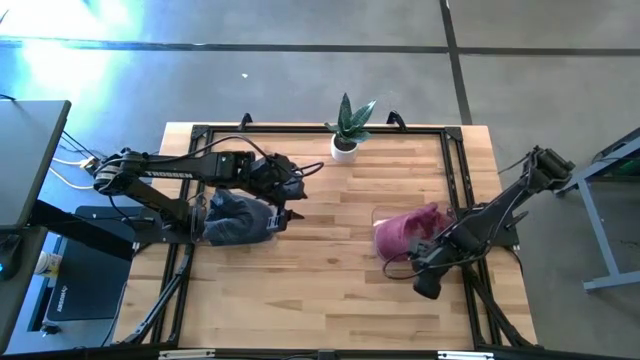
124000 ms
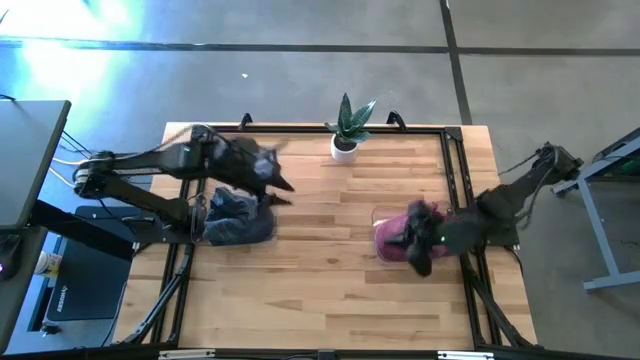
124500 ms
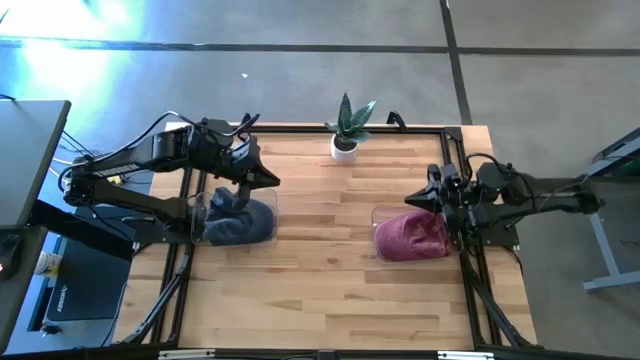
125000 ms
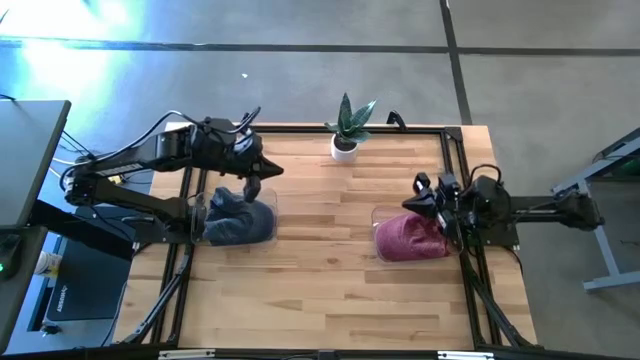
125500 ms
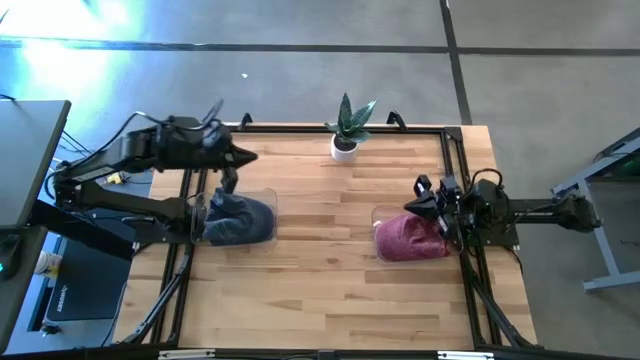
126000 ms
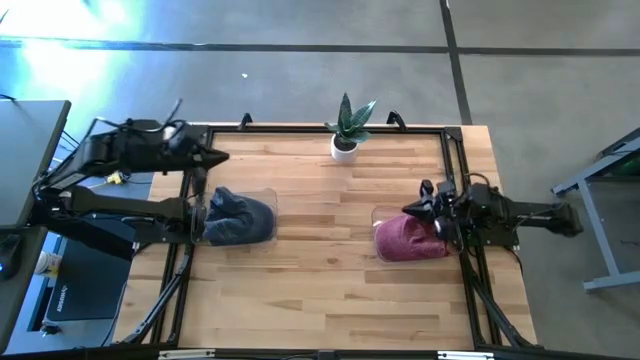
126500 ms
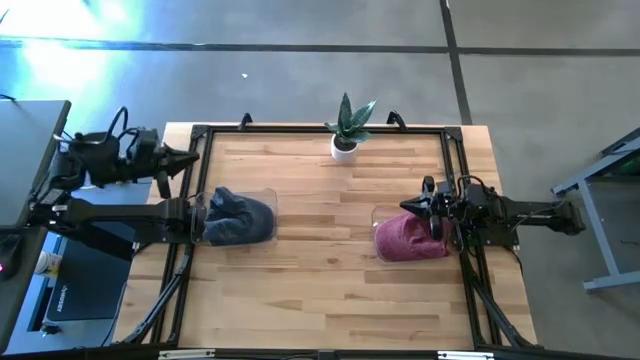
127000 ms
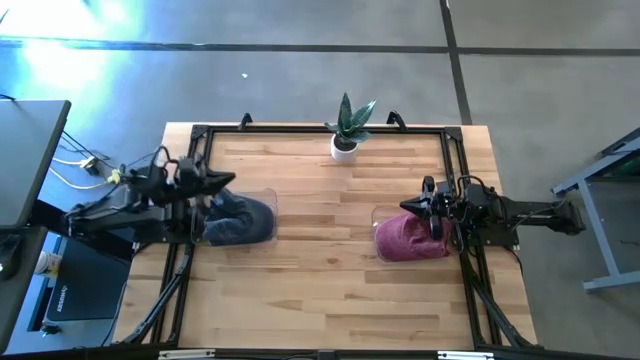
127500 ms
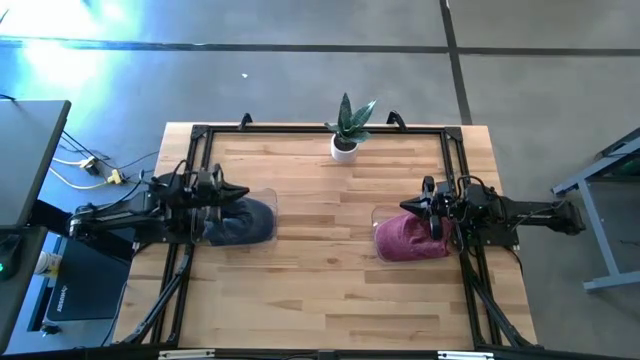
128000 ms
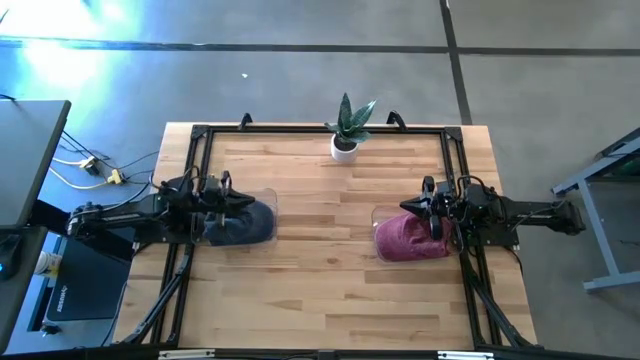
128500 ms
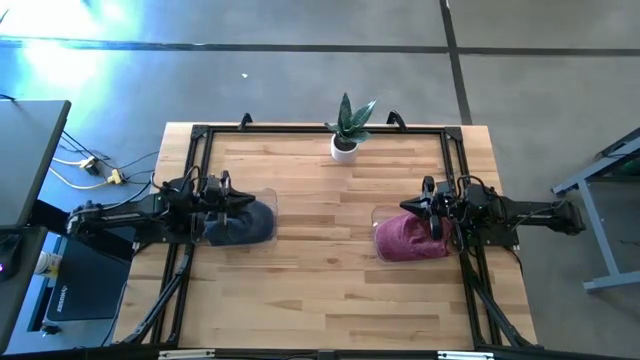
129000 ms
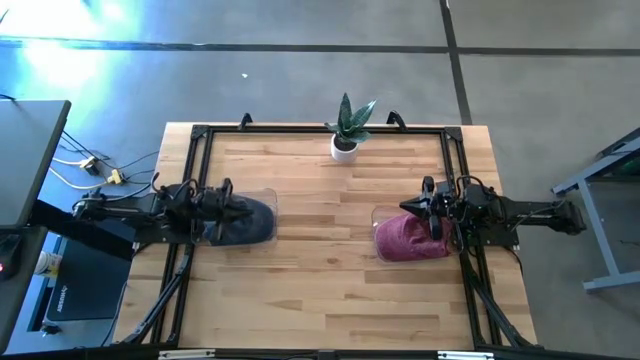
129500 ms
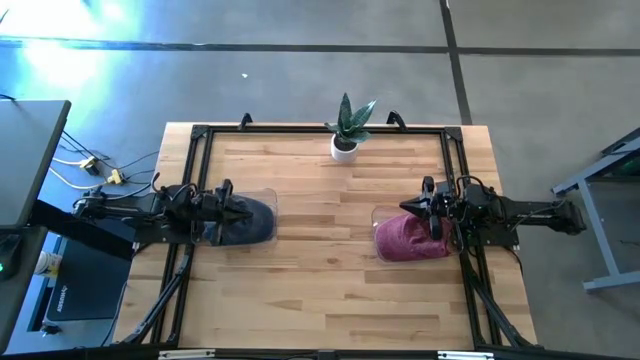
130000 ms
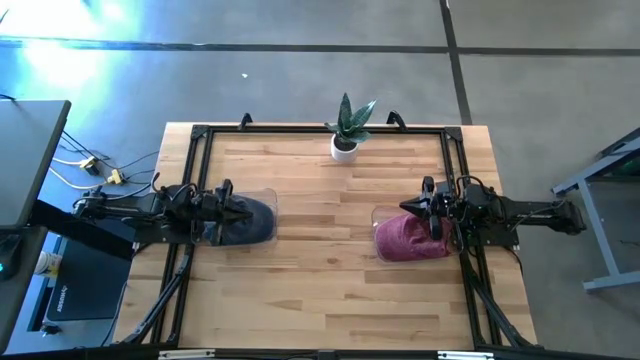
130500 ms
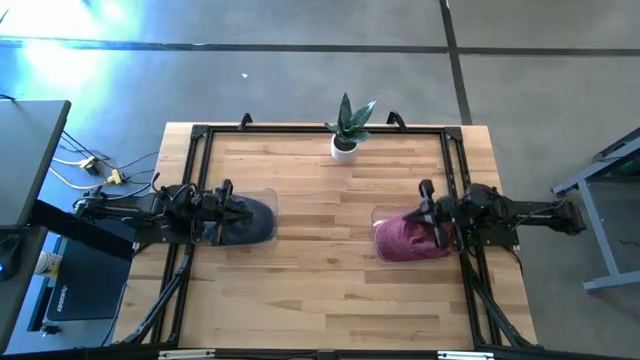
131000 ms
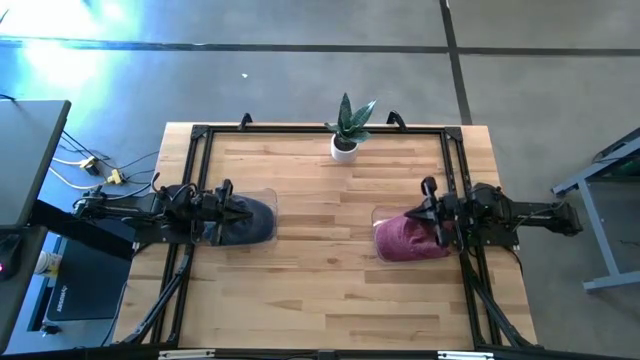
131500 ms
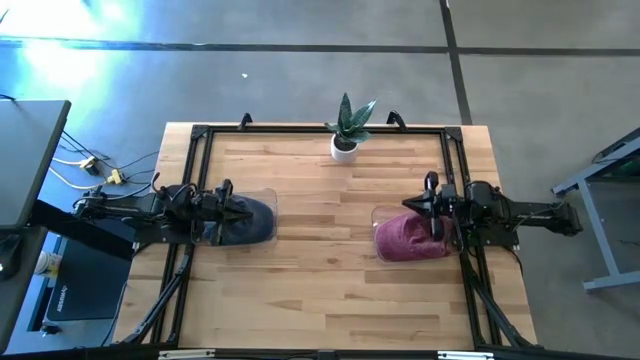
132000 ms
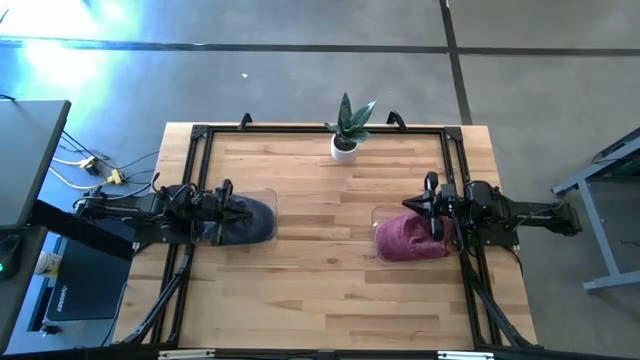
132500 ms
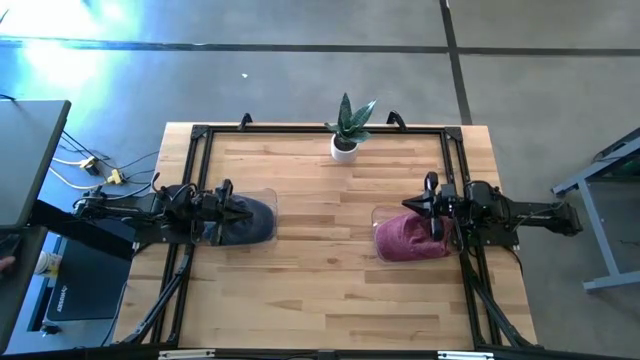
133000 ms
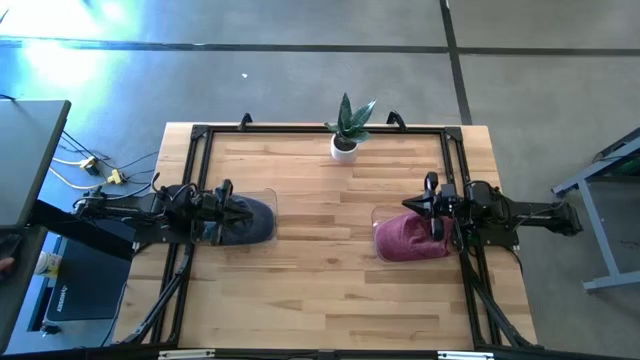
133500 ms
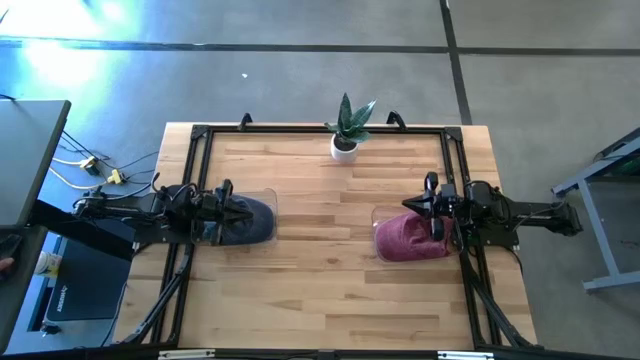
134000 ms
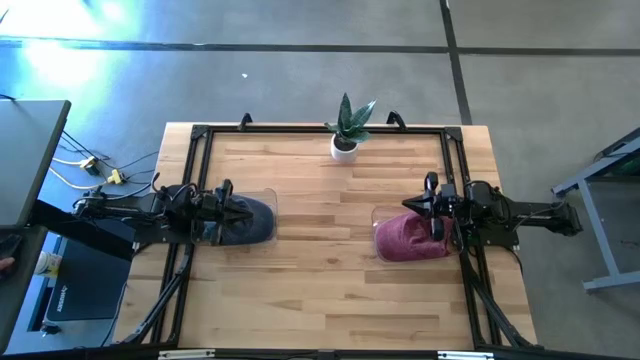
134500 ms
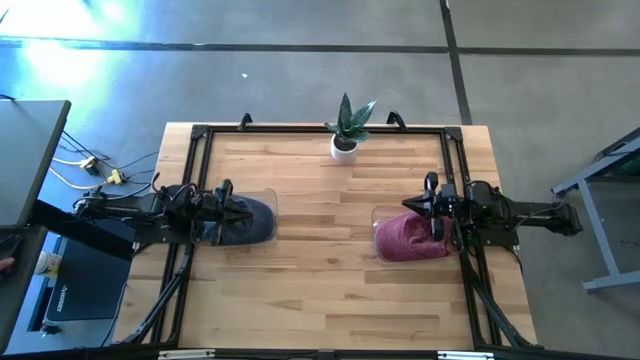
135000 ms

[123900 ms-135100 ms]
Task: Pick & Place hat
Return to Home Position

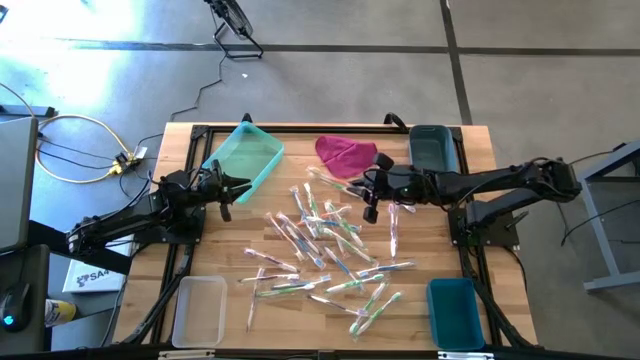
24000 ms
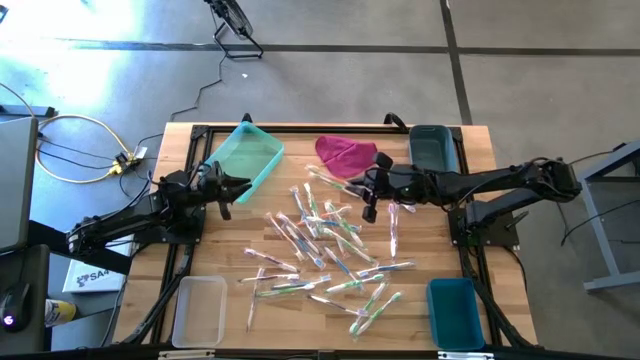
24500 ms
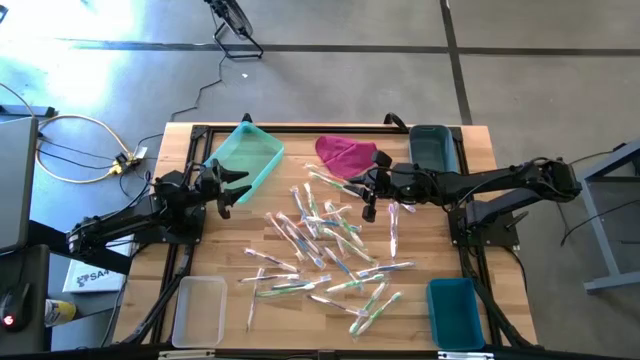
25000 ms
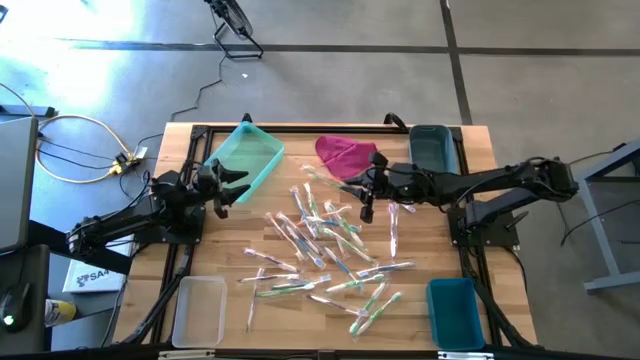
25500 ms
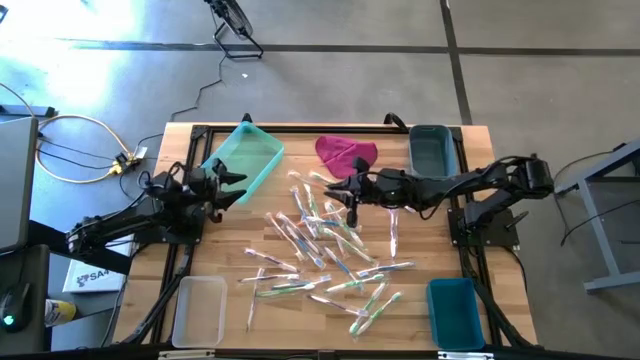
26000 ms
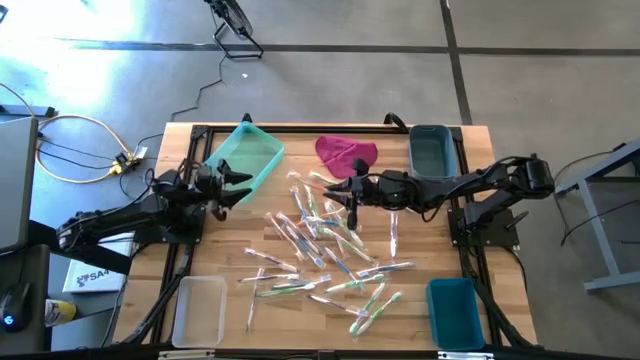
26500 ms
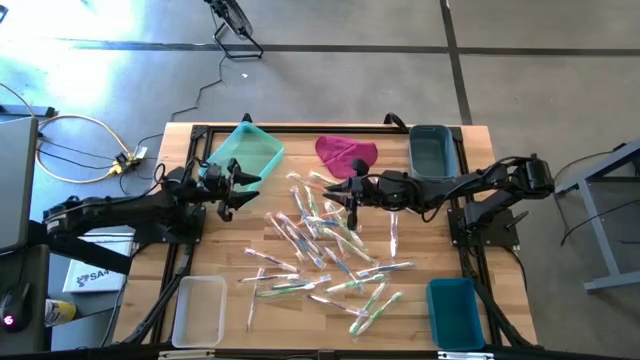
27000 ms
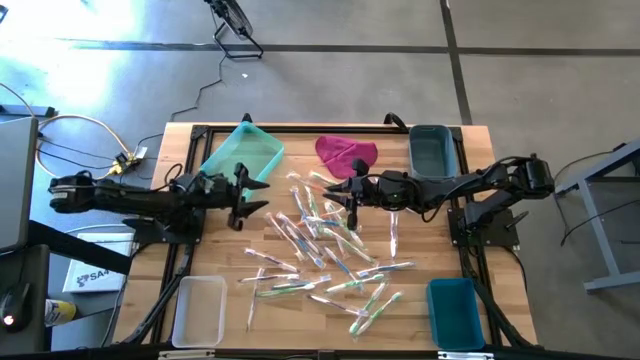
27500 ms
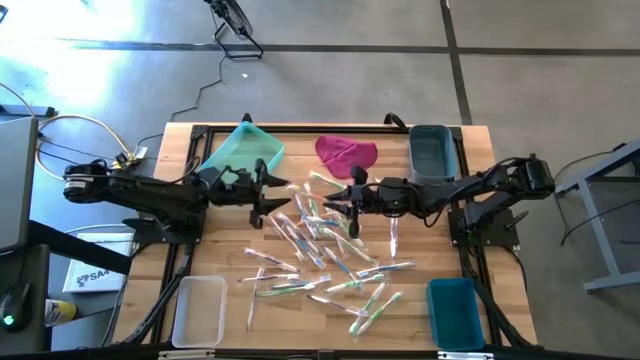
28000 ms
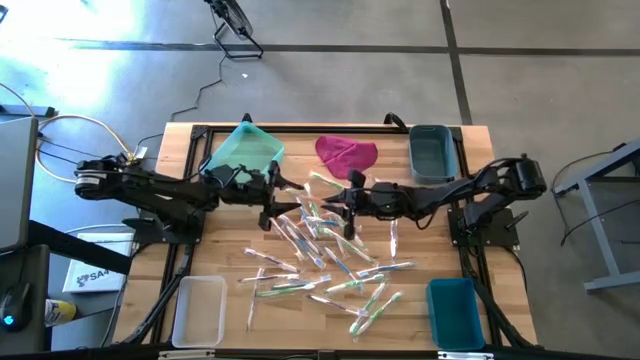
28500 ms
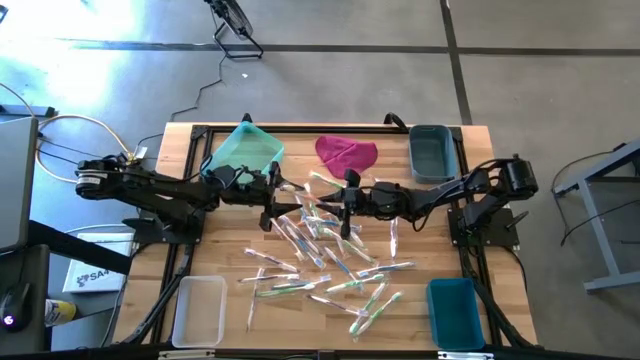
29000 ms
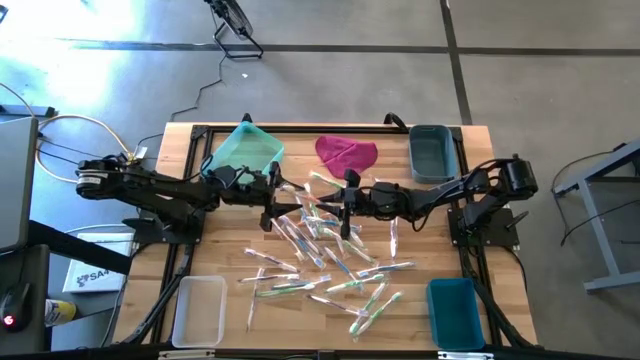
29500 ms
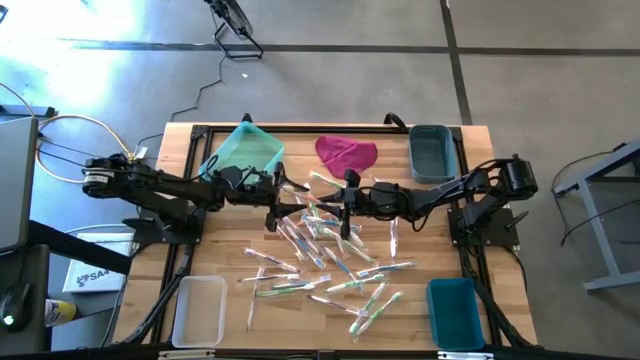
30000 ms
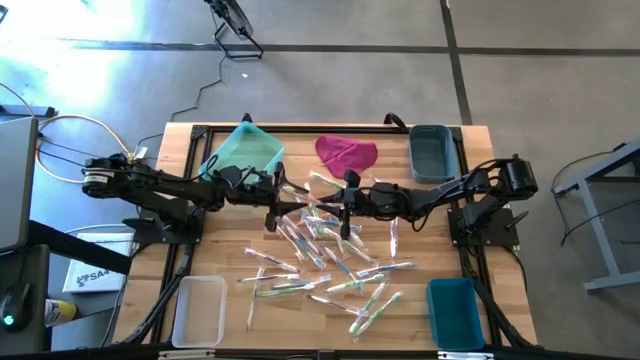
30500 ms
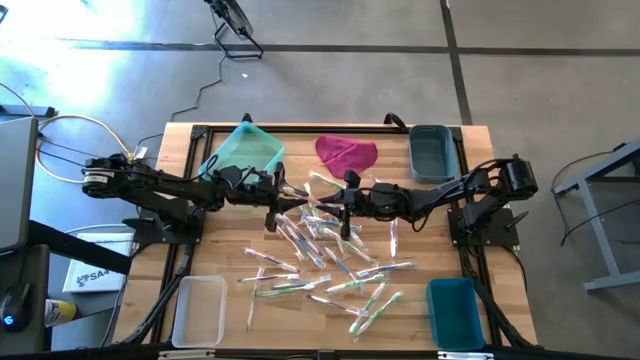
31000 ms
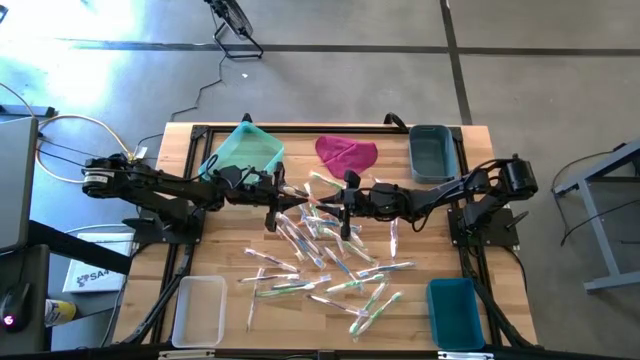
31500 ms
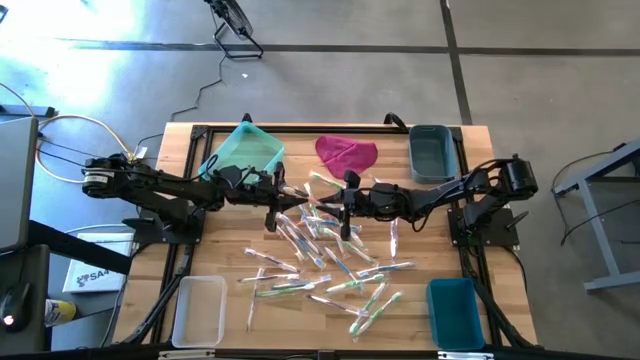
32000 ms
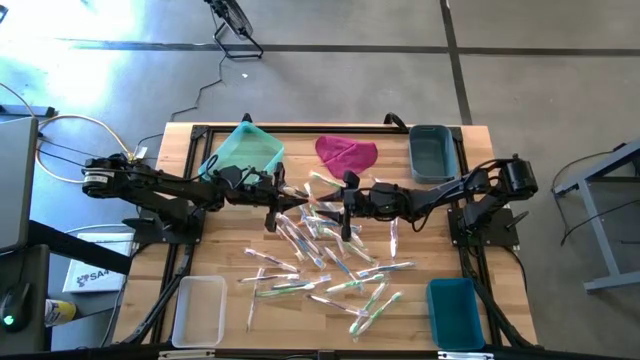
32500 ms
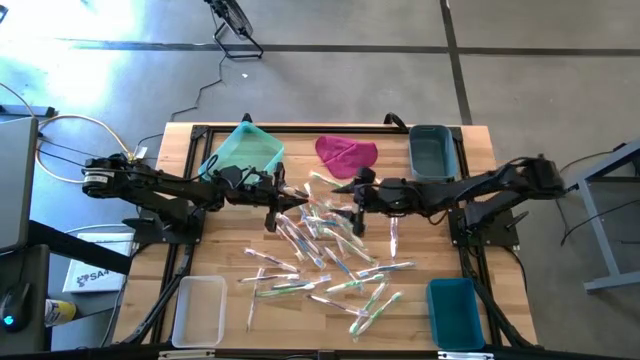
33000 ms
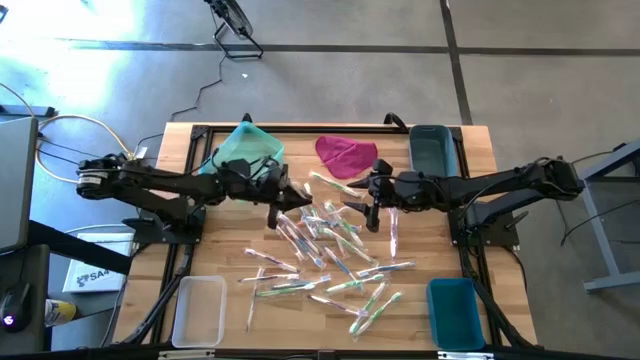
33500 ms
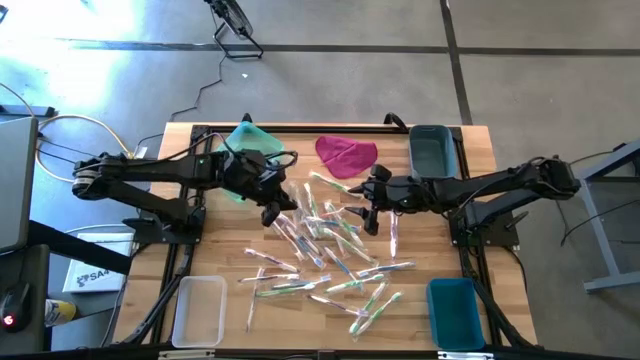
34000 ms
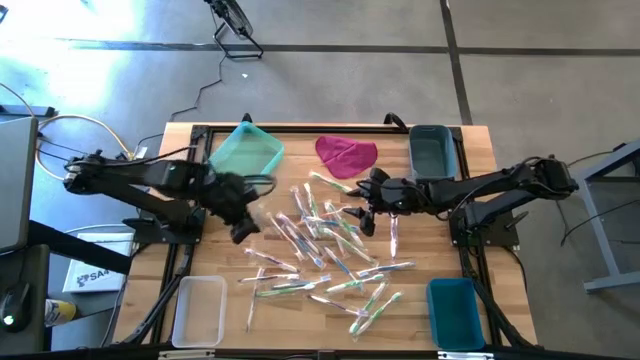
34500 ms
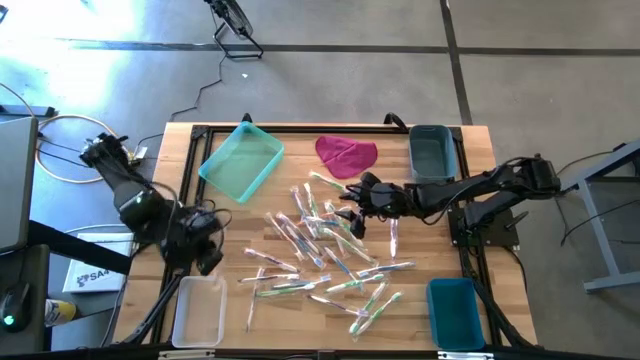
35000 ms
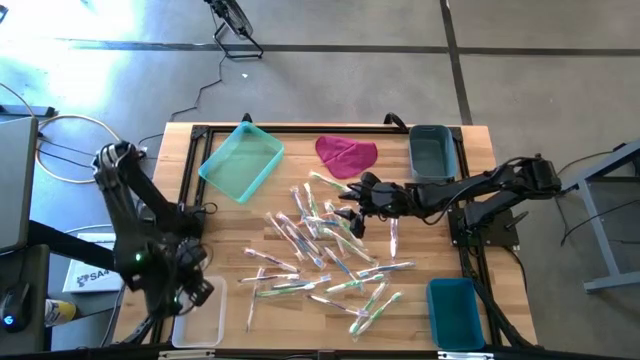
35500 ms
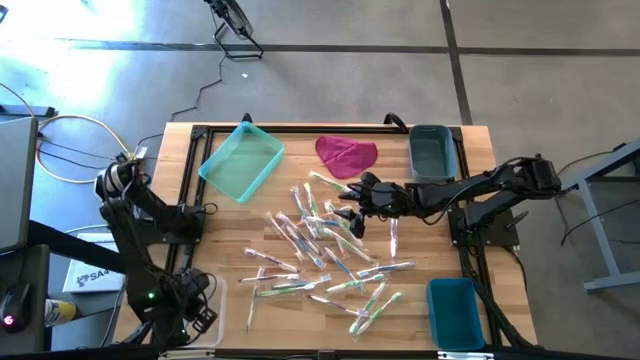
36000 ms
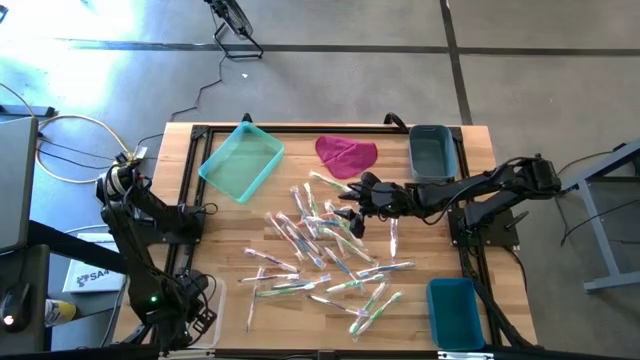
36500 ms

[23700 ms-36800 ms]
Task: Pick & Place Toothbrushes
Put the orange toothbrush to the transparent bin
